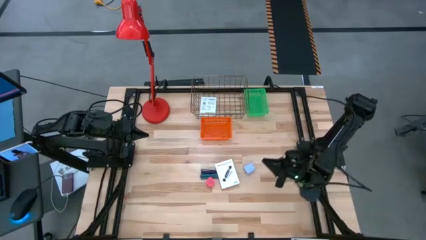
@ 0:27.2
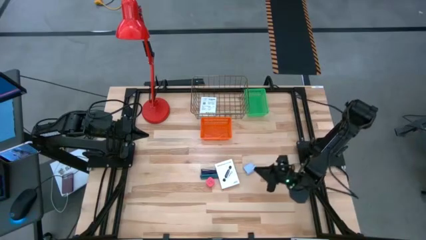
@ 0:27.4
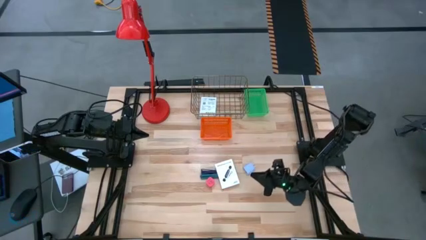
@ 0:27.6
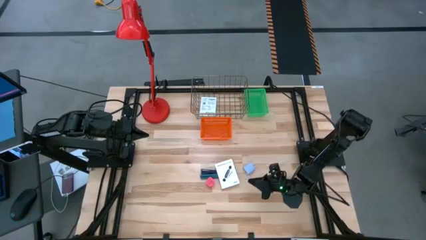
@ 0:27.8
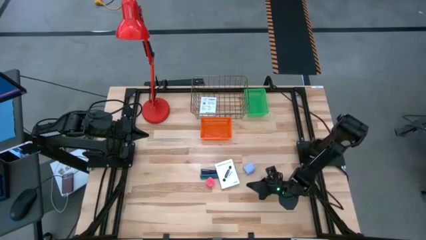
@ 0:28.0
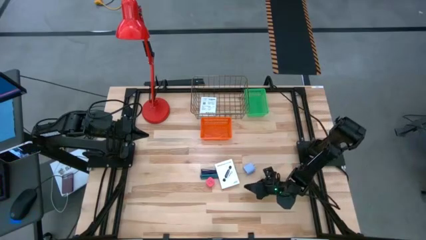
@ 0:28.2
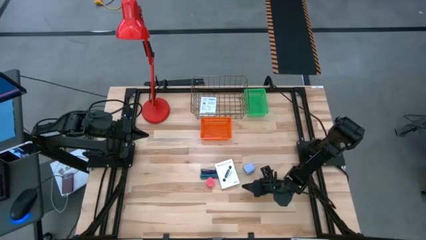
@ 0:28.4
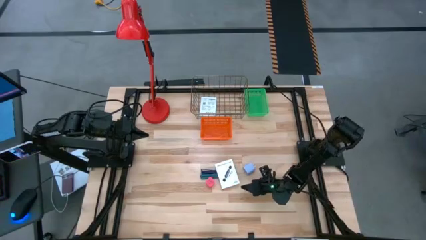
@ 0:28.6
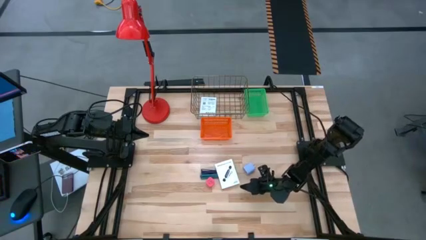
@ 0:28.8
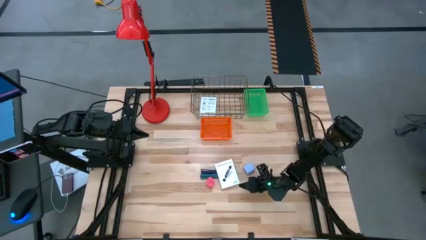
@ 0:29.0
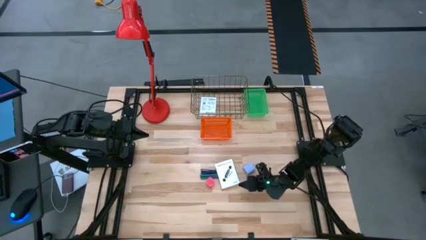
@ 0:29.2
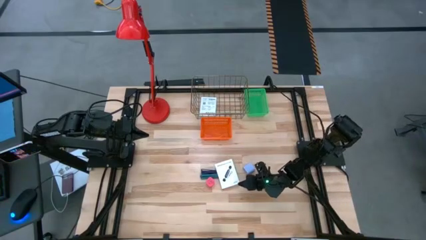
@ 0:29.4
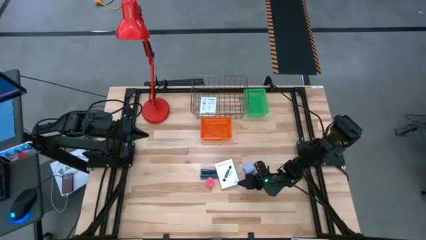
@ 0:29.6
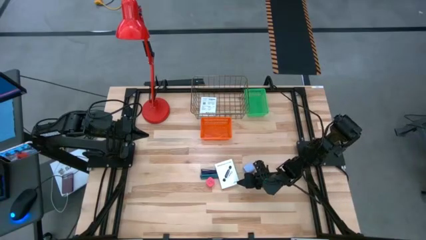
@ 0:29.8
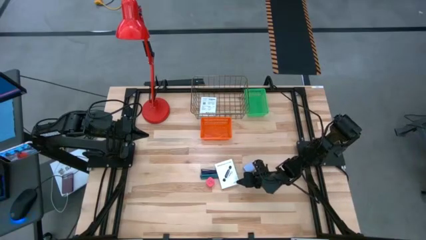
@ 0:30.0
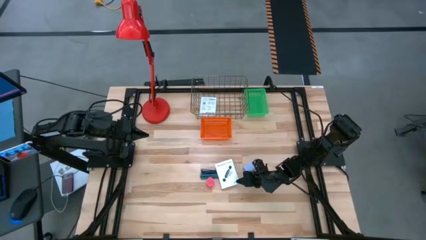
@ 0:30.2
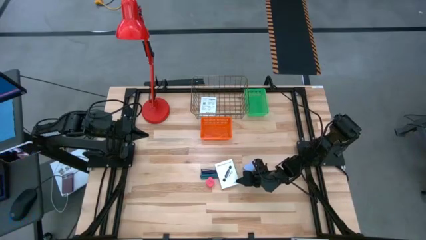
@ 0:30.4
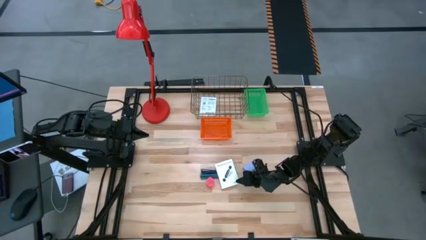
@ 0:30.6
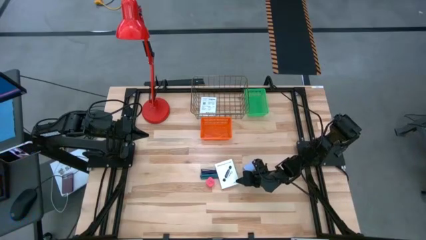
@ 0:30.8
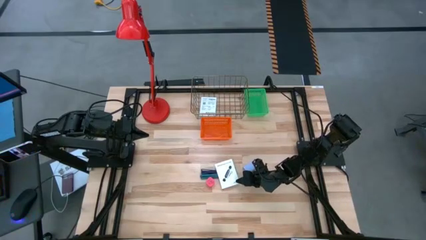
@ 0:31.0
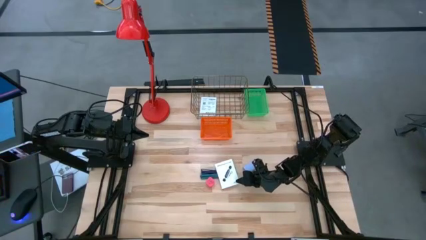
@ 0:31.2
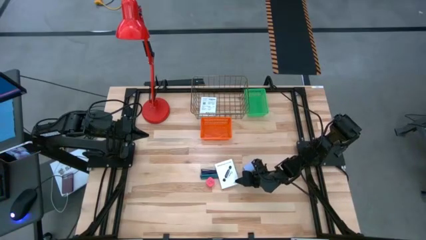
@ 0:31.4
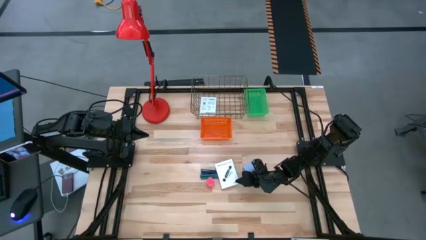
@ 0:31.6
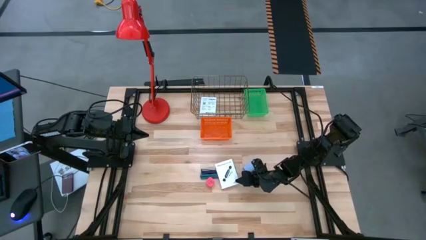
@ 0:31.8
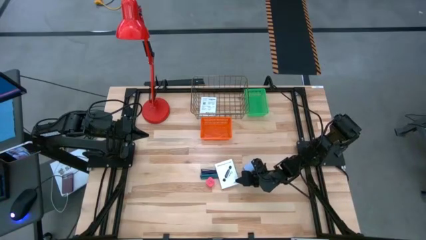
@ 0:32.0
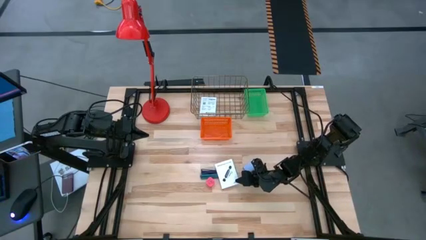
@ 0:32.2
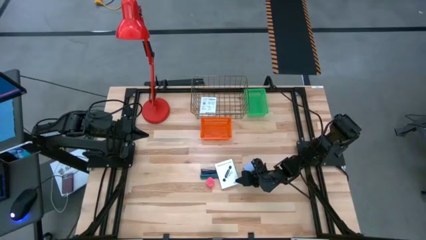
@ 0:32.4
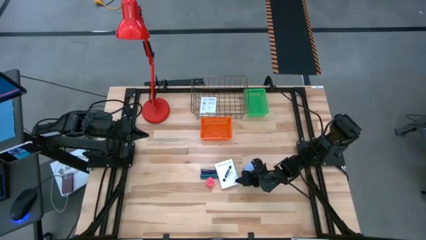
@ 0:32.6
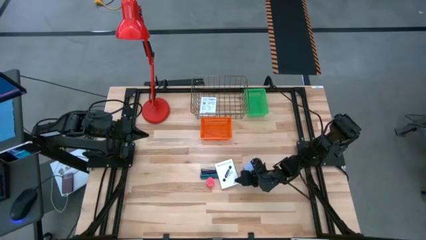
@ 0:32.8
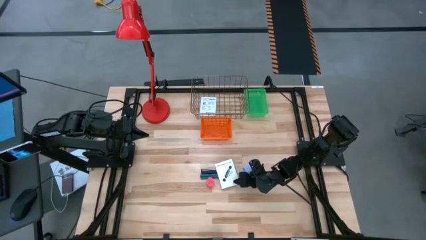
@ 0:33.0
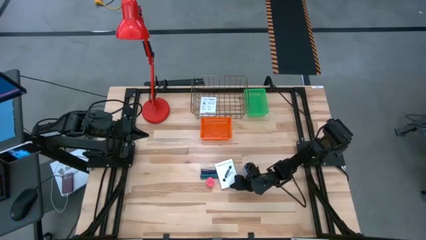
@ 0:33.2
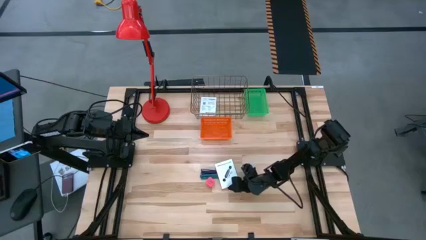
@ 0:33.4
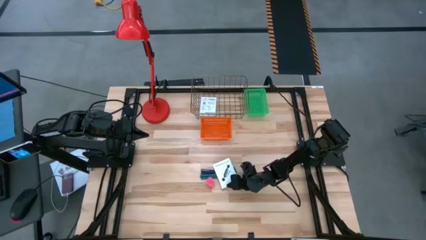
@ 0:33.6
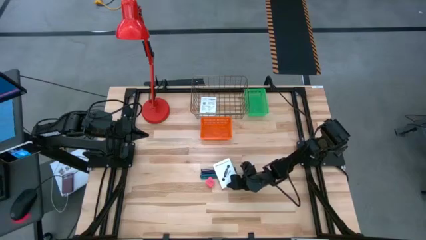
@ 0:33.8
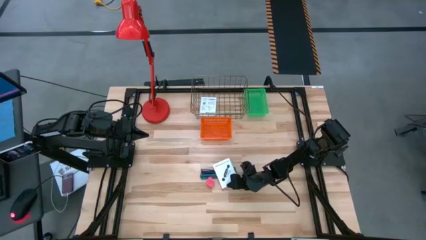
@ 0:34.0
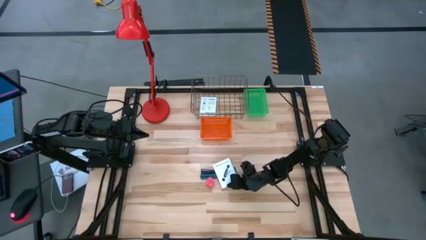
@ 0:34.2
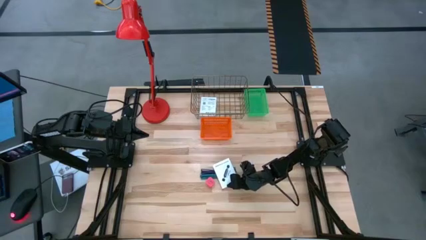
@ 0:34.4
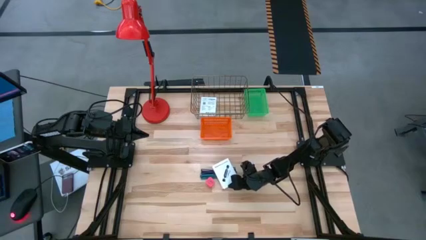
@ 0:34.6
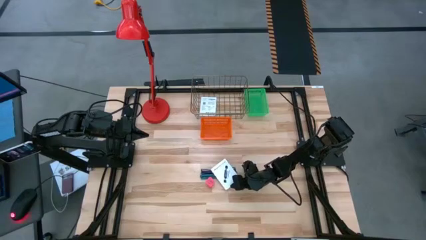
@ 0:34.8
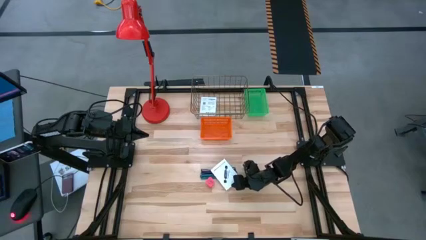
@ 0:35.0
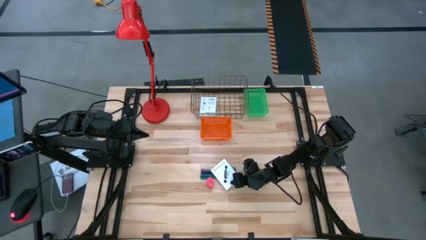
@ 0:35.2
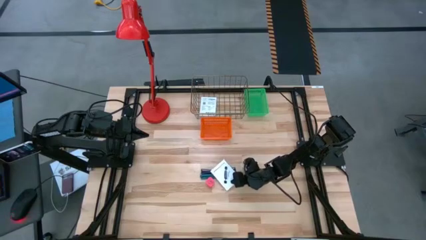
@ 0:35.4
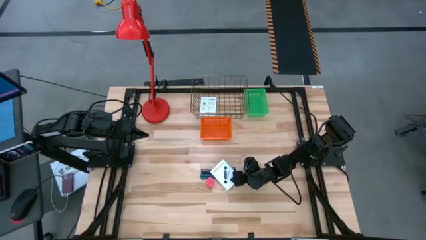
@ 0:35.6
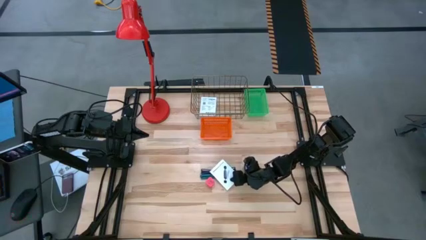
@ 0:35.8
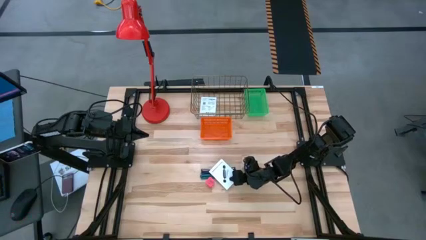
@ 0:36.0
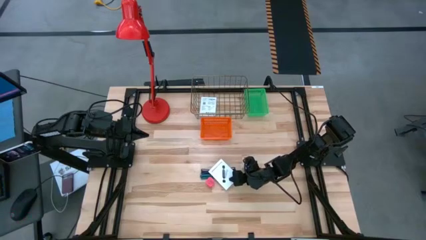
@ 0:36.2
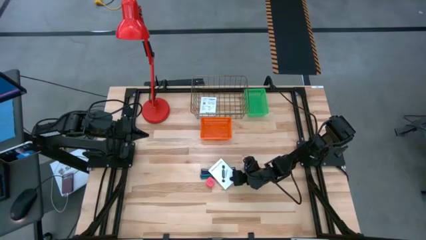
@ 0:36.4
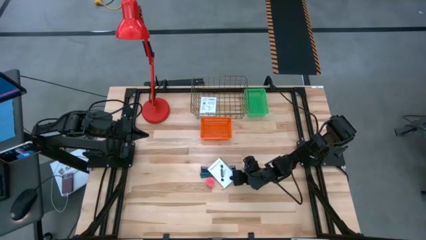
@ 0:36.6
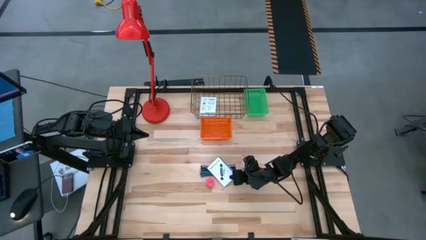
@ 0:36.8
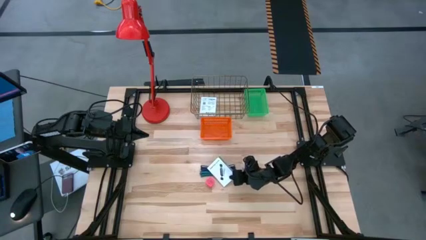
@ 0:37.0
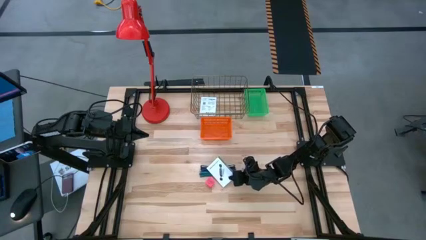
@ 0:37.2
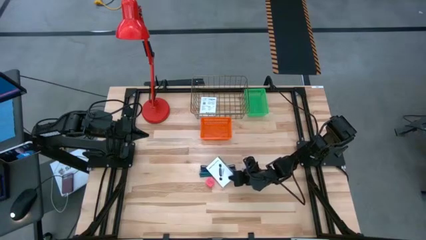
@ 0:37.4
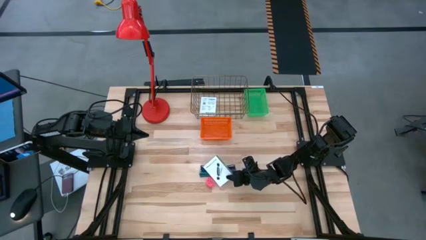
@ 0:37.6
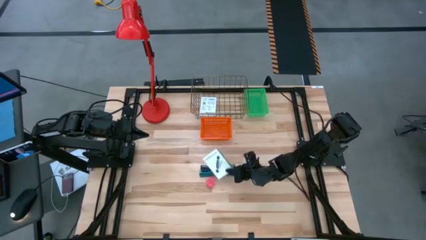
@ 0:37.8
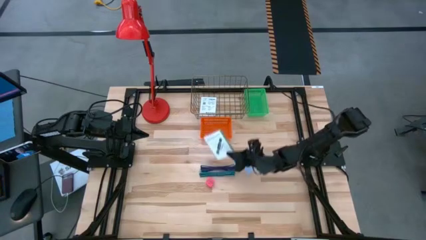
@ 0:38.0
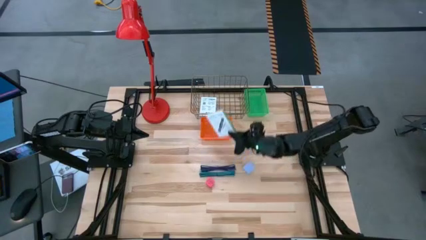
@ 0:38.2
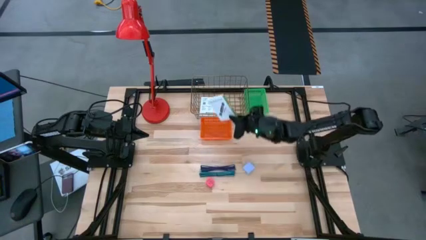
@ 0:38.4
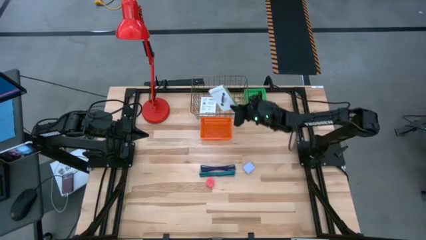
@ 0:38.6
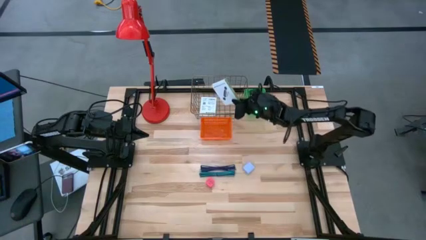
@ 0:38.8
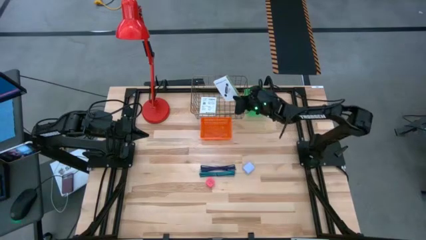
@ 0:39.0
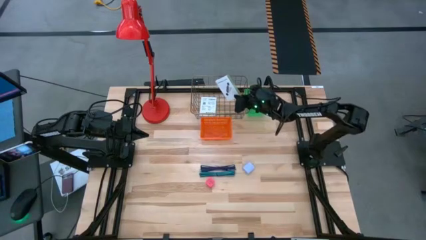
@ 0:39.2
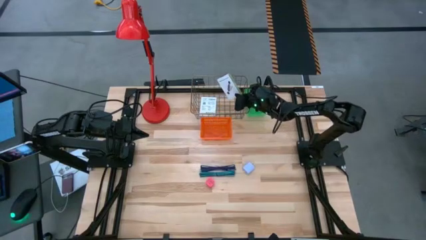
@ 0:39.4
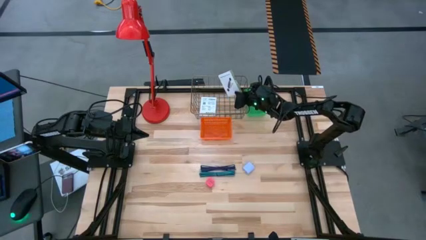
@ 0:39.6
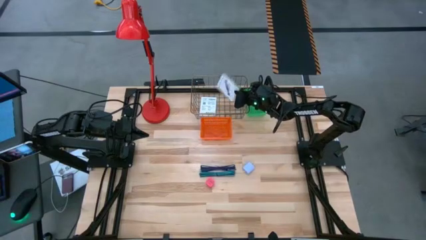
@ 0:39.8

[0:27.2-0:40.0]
Task: Pick and place items into bin
Put the card reader box into the gold wire basket
